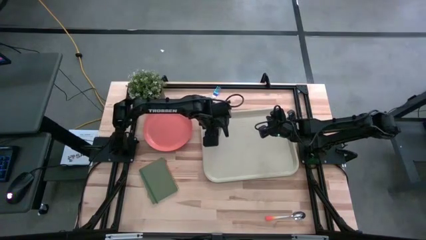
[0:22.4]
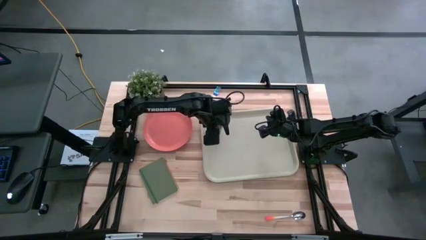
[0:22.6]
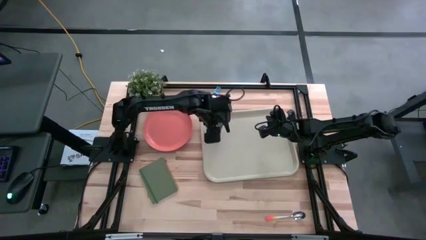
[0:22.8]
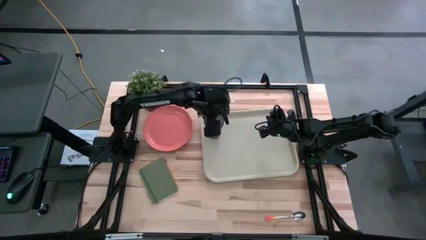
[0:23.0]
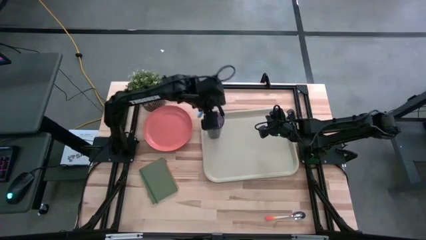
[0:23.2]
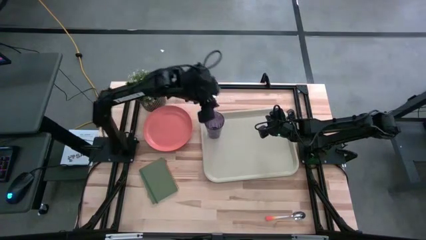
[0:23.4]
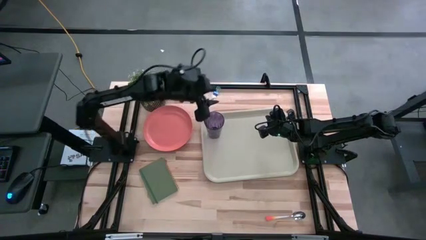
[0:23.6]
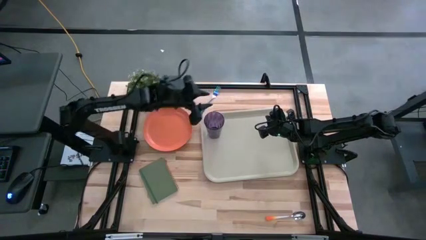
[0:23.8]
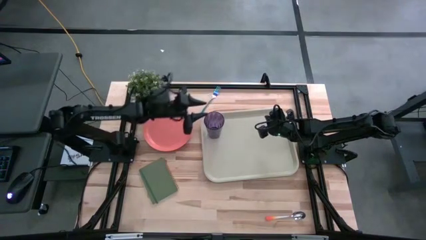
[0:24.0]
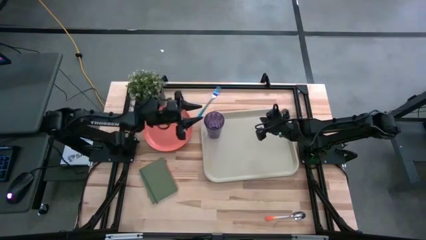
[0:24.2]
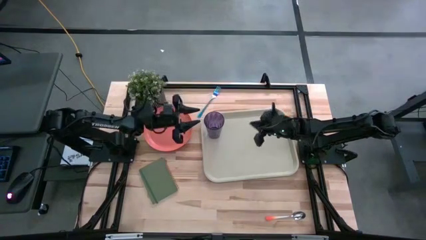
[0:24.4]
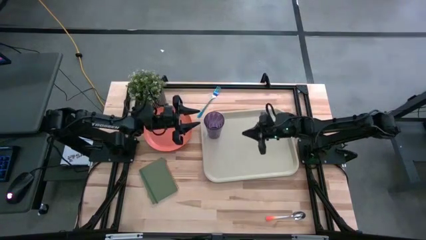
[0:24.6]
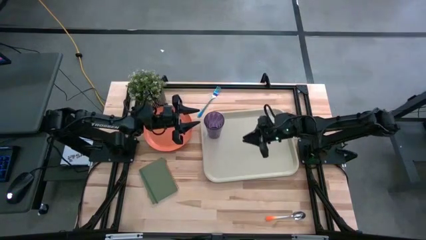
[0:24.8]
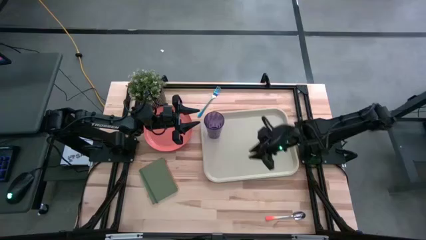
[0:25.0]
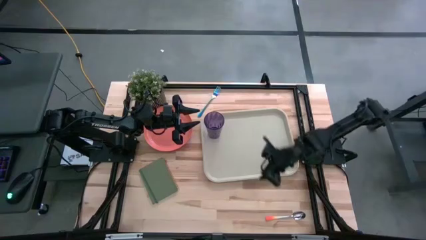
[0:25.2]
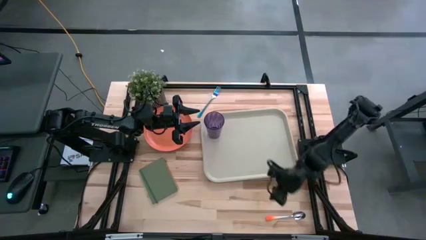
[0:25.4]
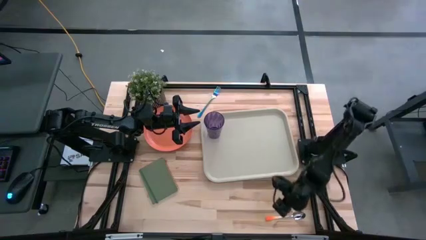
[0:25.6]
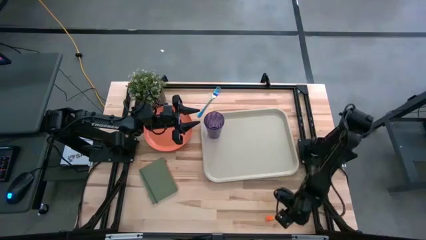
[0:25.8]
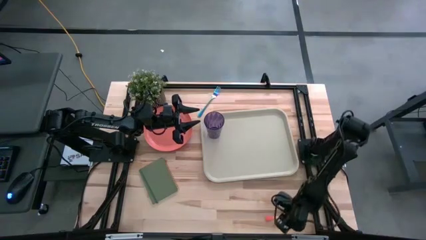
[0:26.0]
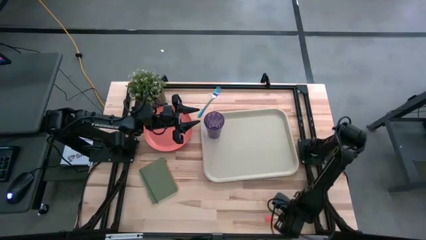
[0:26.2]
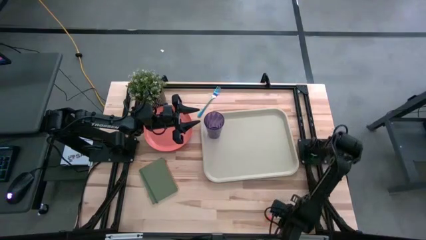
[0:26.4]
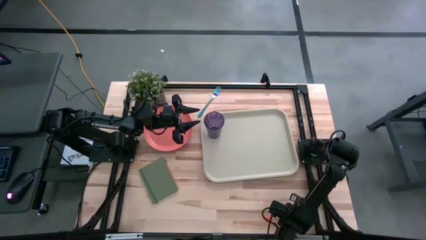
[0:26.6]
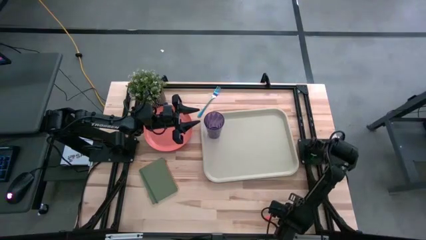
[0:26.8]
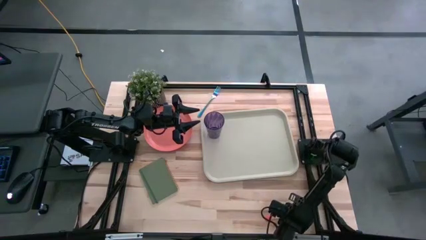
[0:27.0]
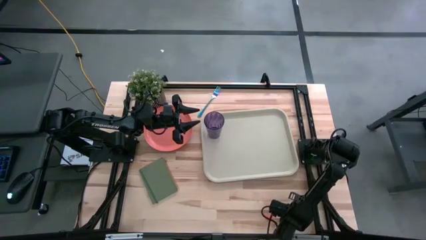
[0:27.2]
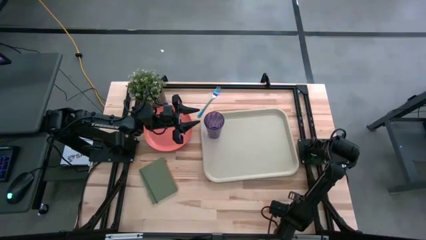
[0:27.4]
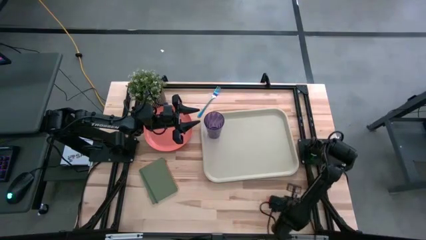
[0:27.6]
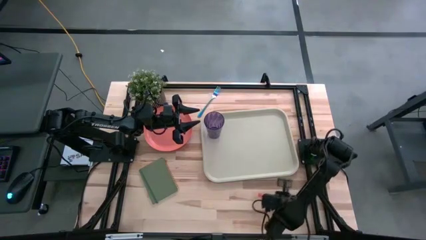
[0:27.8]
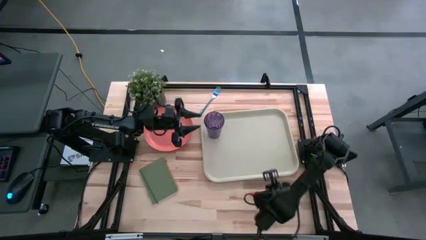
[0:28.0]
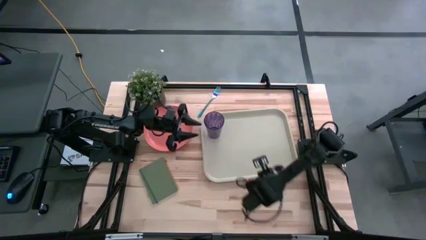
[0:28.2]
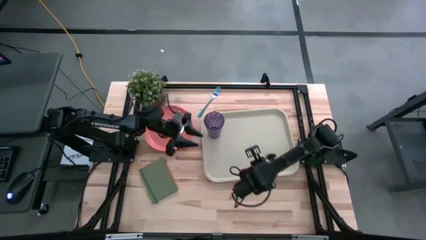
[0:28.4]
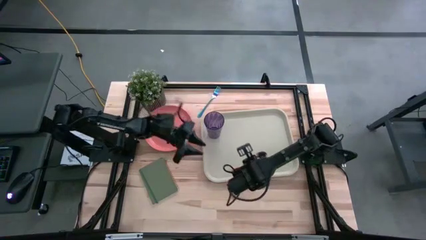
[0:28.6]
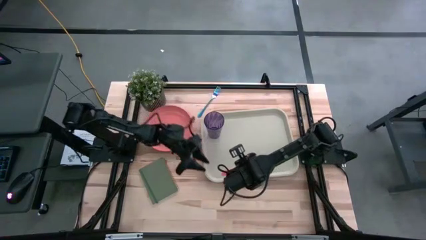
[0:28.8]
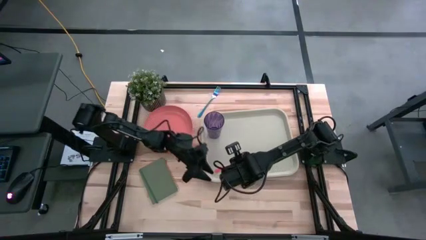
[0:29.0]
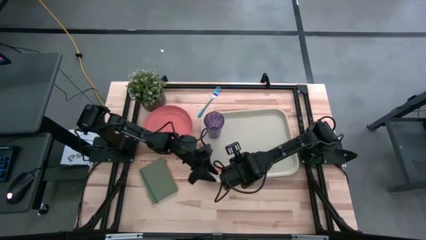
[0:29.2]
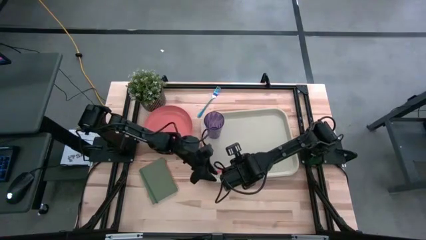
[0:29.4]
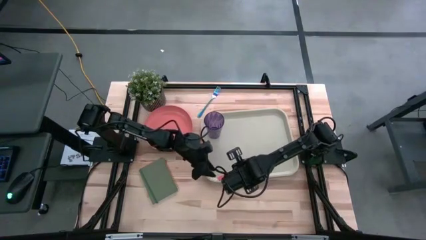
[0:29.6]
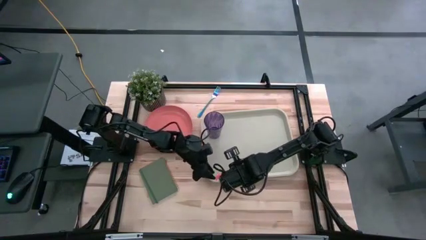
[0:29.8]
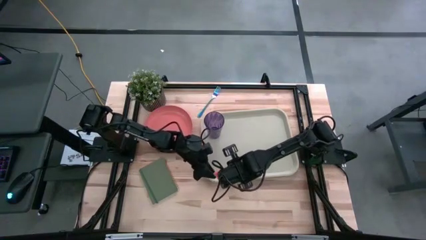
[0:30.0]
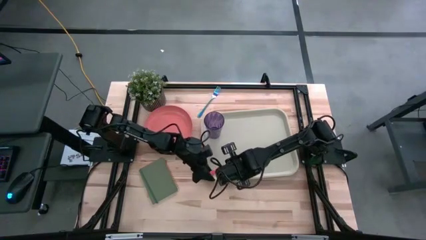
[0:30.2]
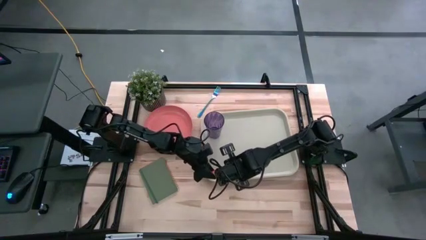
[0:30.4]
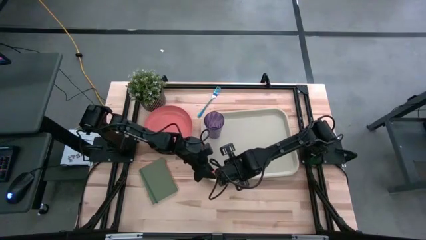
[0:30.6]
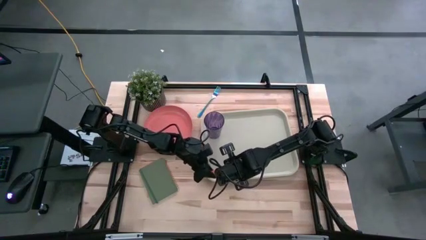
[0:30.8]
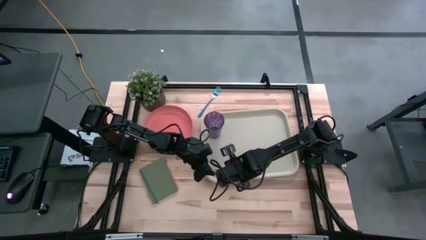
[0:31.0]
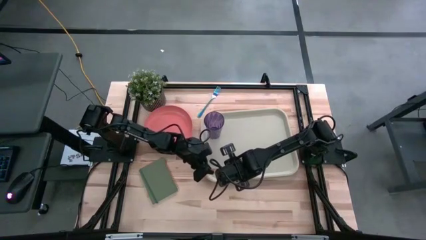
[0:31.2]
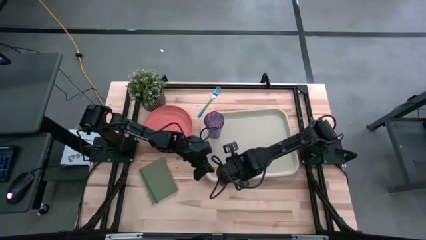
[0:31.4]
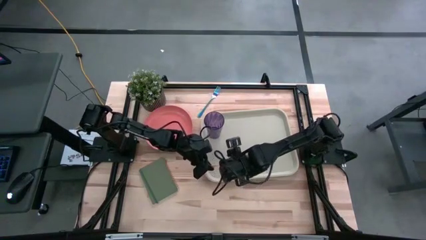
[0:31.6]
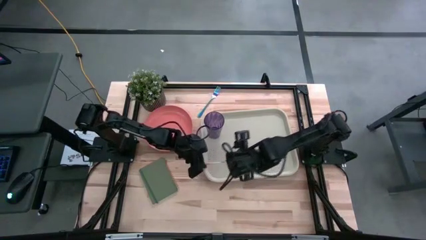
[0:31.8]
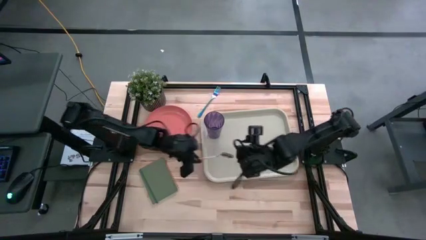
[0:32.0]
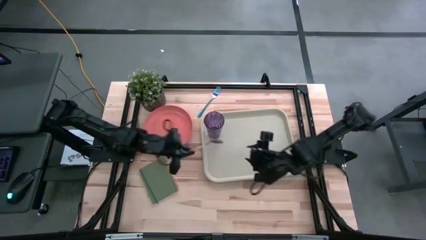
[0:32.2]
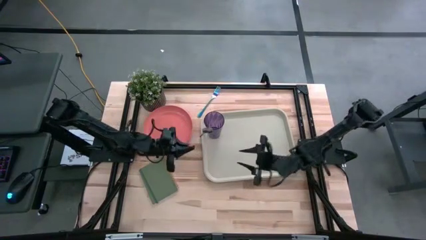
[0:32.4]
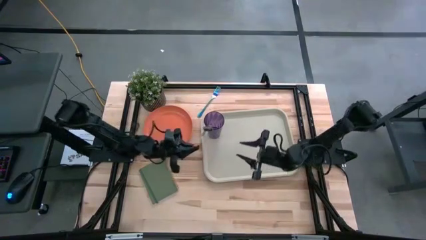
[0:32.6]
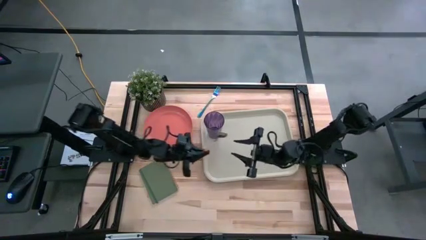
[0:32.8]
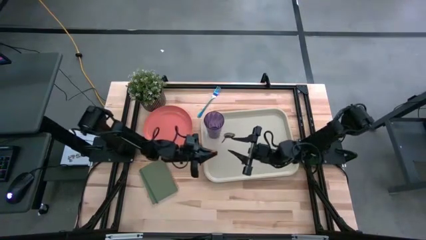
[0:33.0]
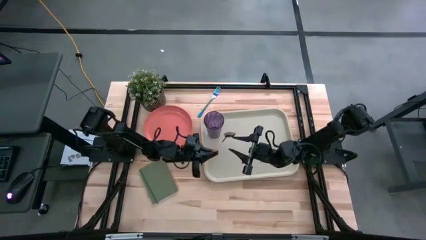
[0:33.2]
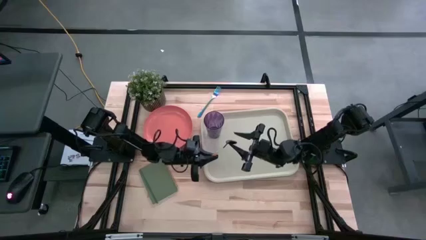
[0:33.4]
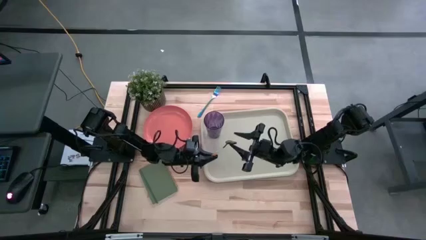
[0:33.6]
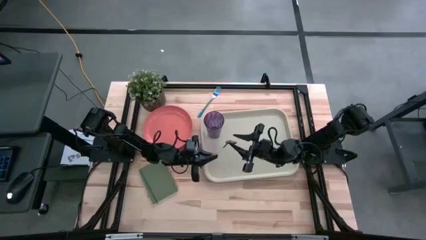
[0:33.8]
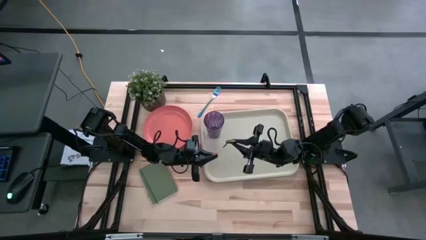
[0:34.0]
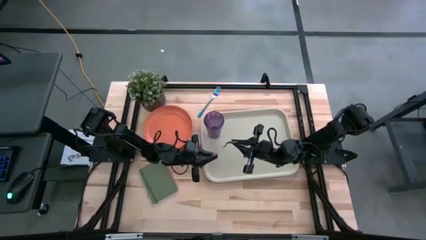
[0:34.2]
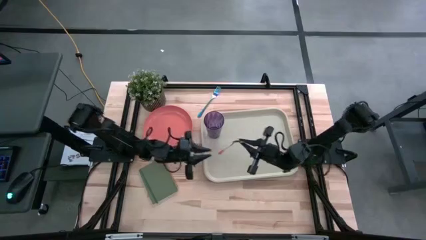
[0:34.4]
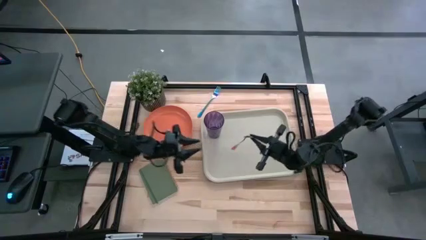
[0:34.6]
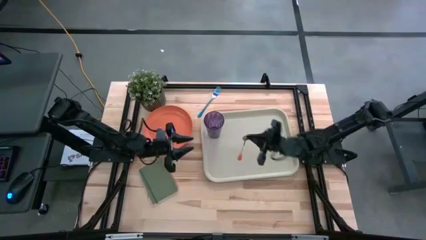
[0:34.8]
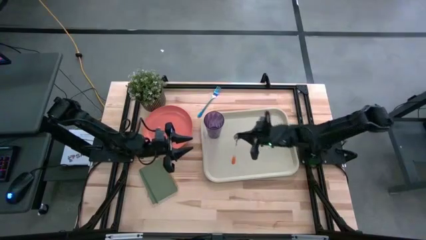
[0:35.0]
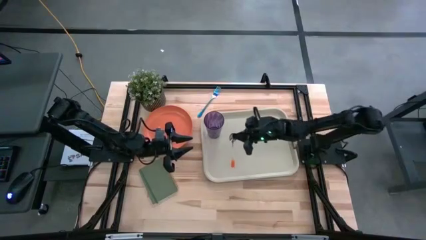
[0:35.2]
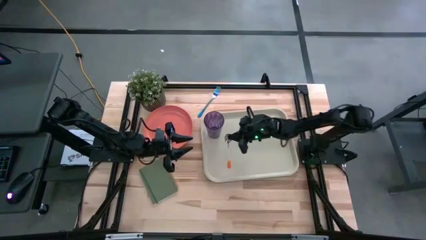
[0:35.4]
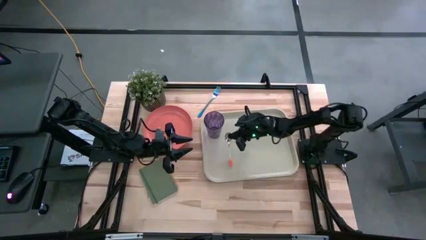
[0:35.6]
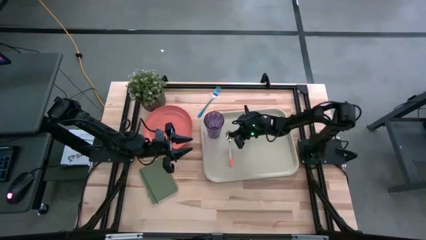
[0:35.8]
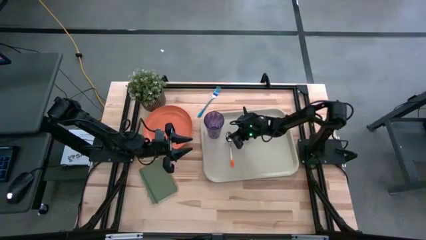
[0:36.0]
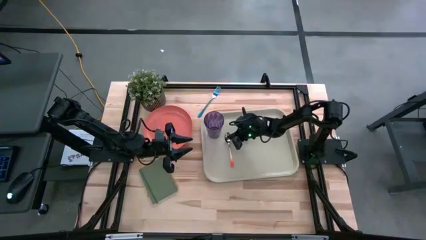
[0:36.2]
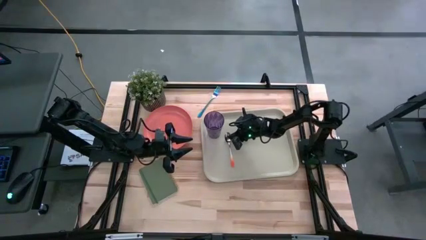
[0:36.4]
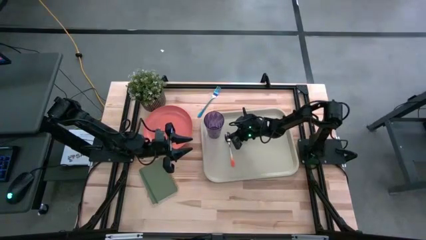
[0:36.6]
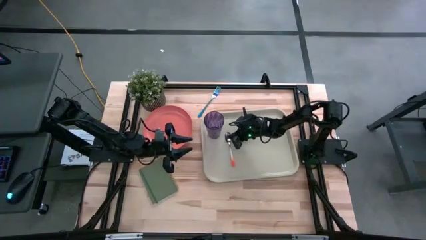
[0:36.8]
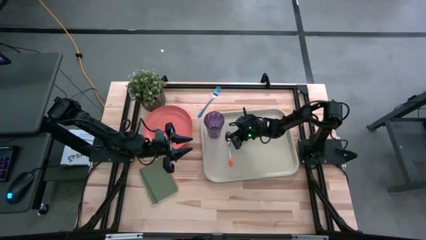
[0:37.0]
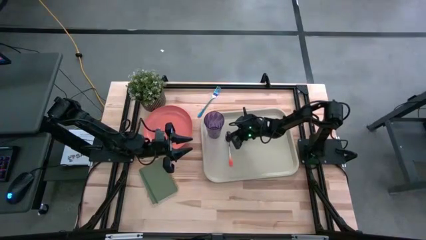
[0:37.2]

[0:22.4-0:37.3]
Task: Pick and place plate/cup/fork/spoon on tray
Put the orange spoon on the gray serving tray to the bottom right of the purple cup

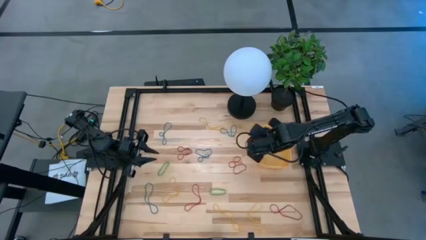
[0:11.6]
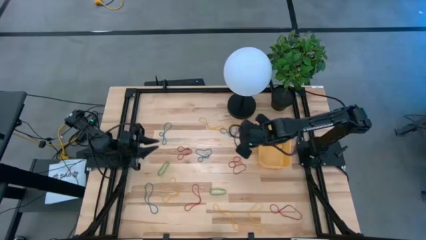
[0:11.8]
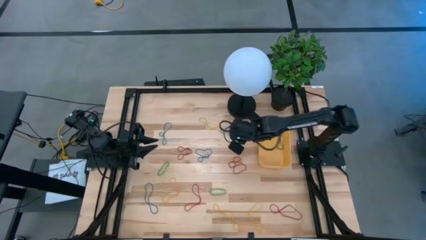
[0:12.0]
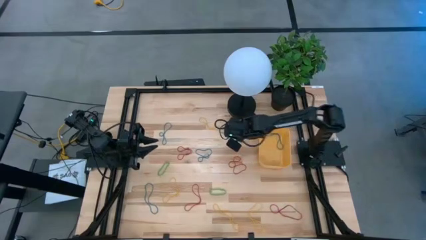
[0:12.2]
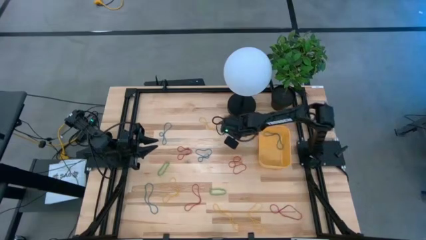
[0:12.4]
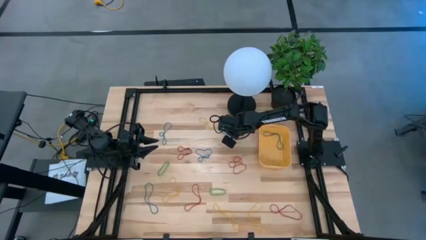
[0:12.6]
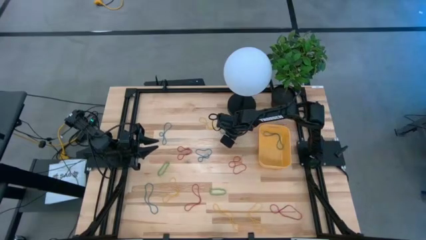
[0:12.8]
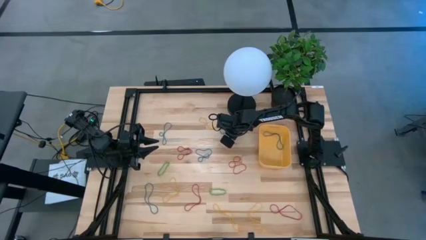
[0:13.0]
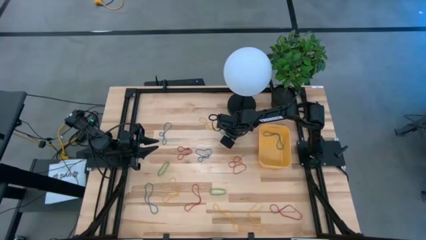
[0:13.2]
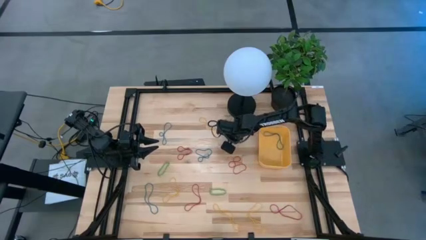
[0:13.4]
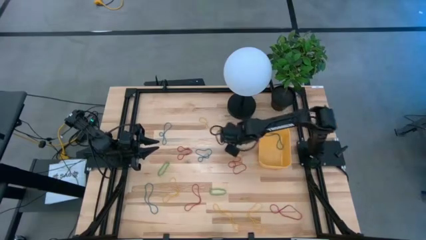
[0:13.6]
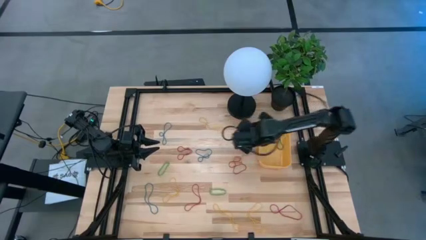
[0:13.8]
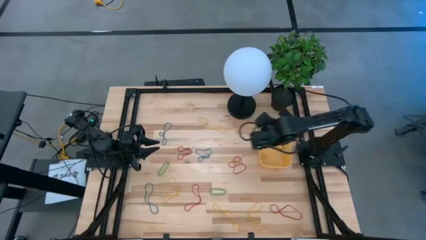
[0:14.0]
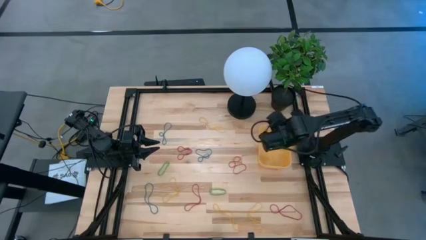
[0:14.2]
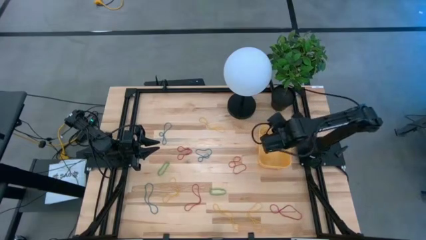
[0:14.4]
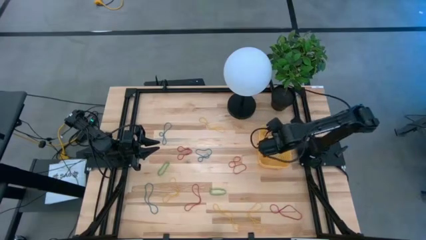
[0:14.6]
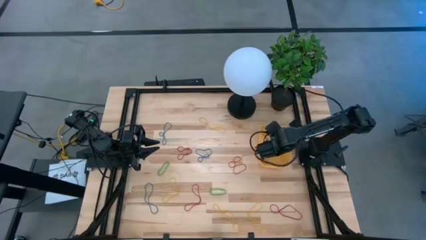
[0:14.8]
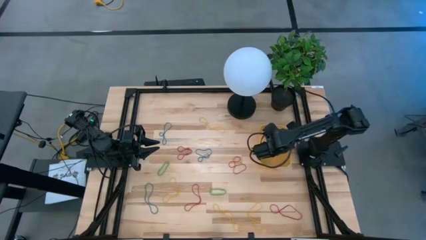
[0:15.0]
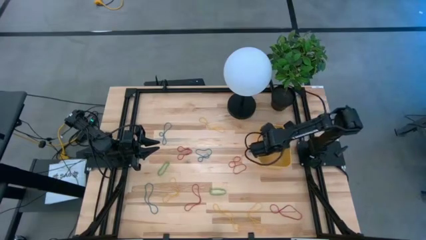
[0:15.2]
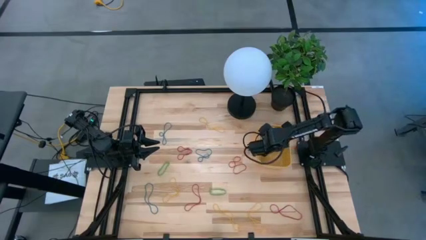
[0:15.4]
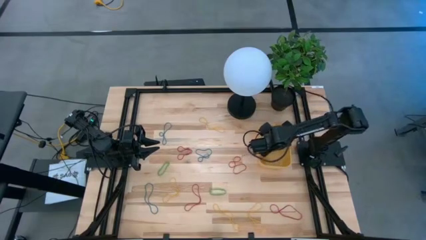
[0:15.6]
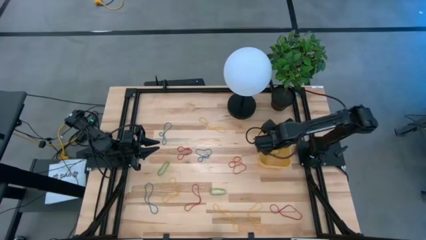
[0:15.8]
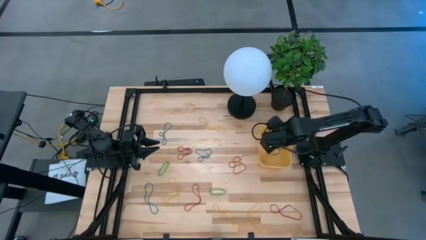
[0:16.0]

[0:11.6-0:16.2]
Task: Pick and place items into bin
Put the blue rubber band into the bin
